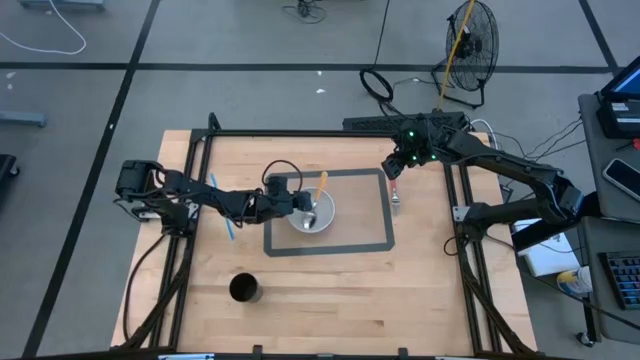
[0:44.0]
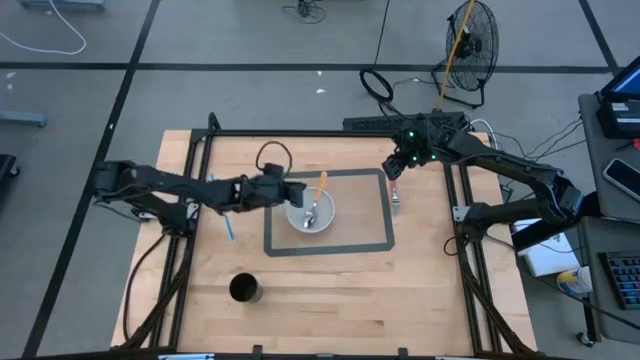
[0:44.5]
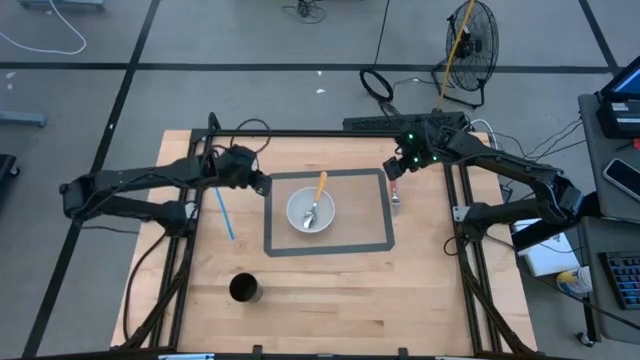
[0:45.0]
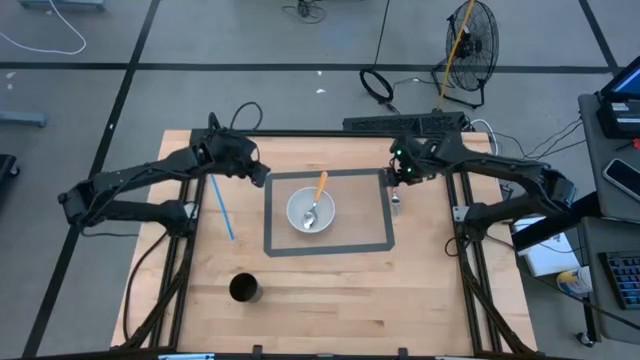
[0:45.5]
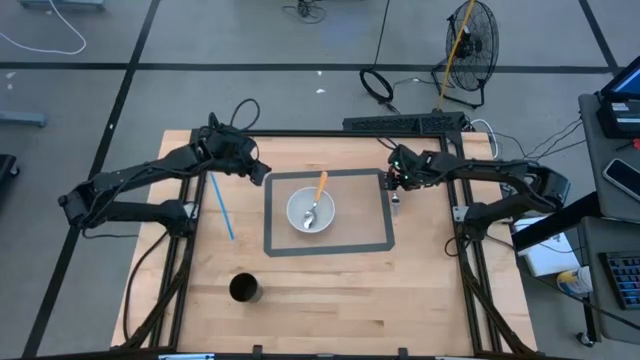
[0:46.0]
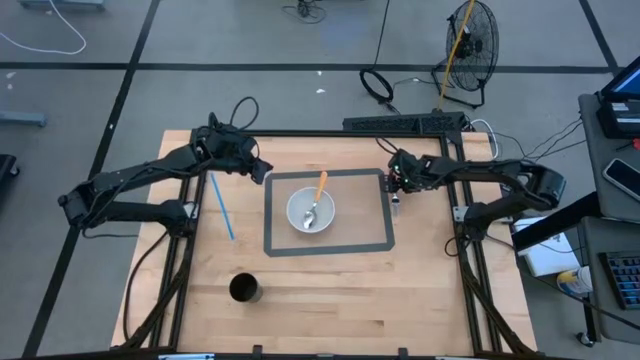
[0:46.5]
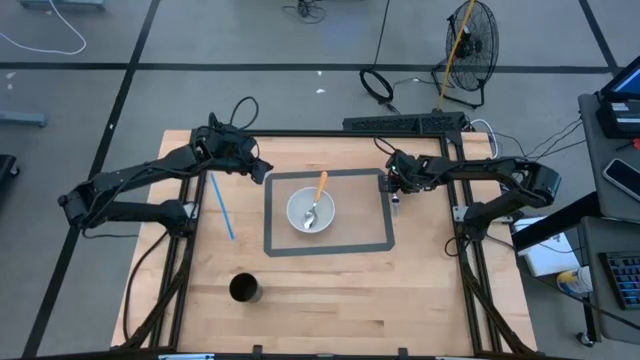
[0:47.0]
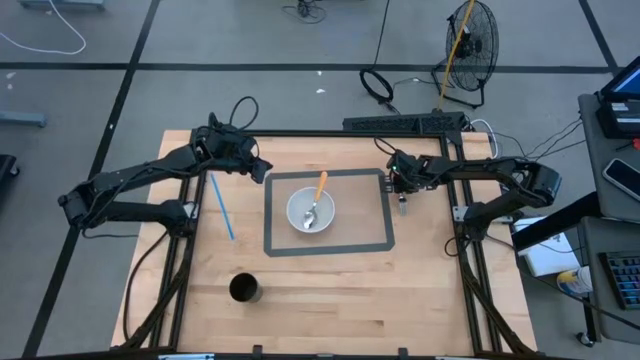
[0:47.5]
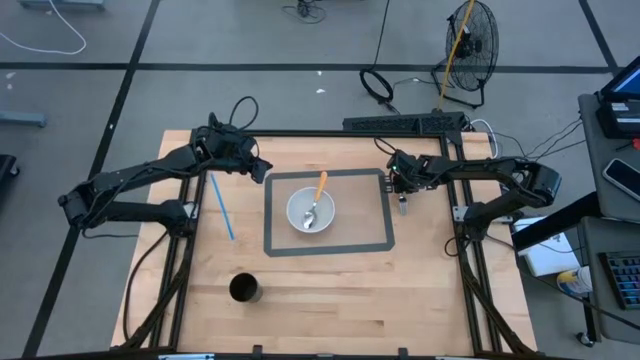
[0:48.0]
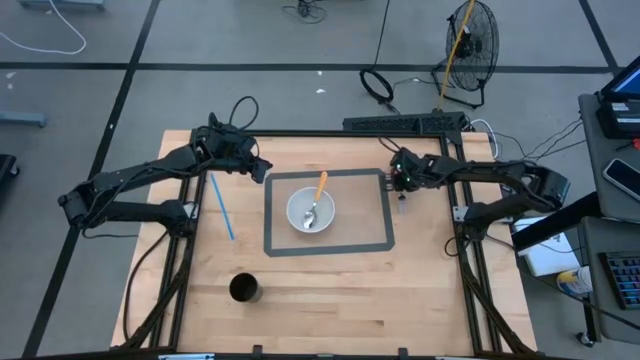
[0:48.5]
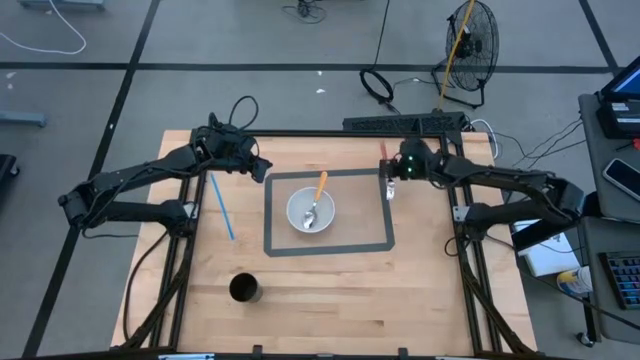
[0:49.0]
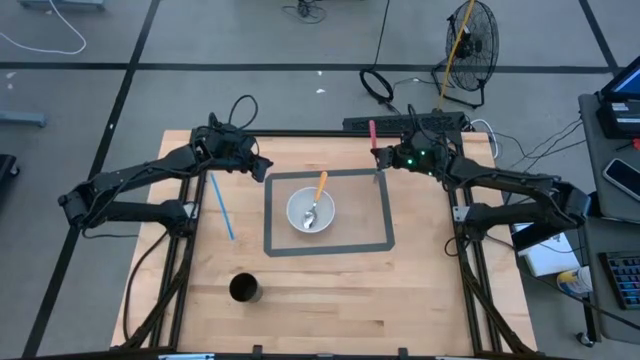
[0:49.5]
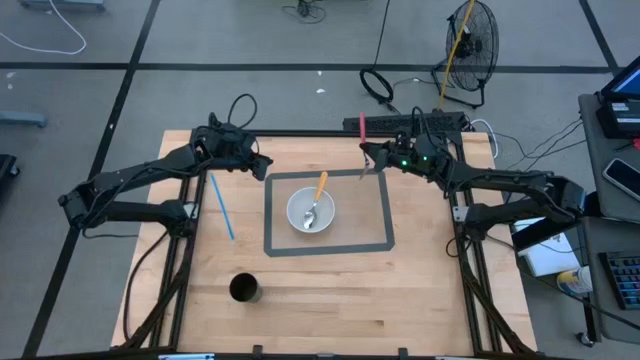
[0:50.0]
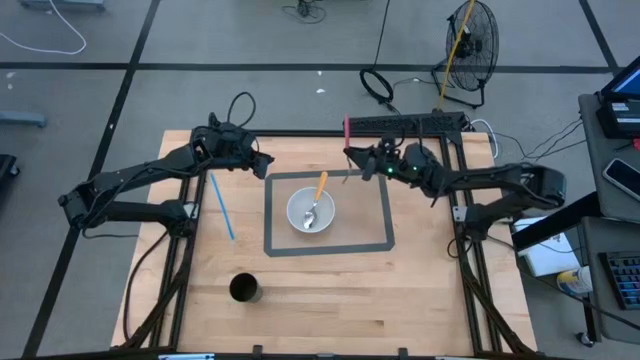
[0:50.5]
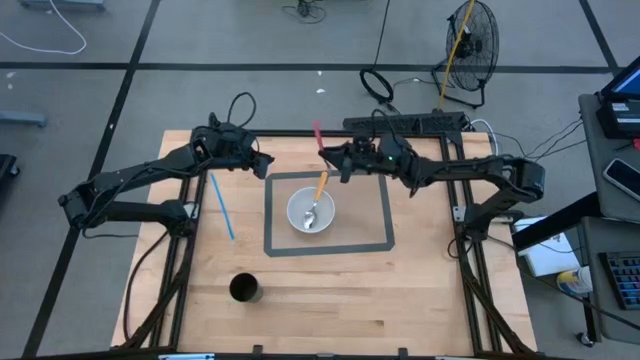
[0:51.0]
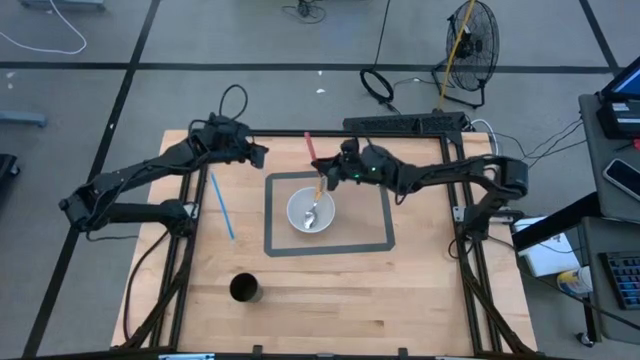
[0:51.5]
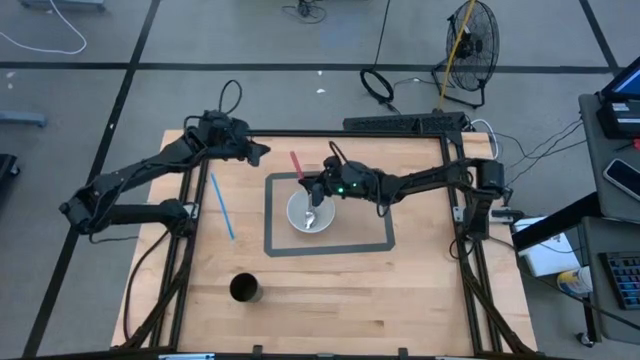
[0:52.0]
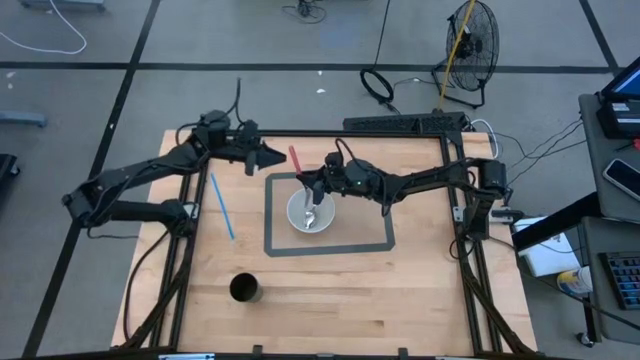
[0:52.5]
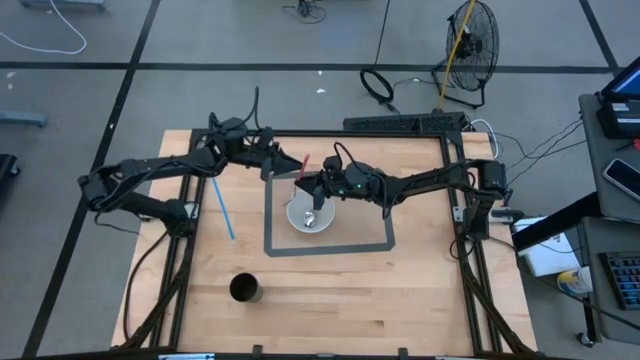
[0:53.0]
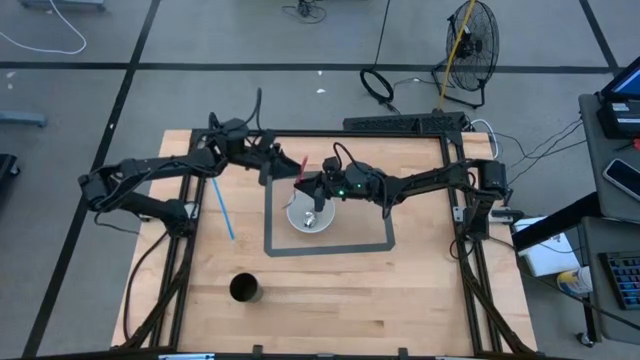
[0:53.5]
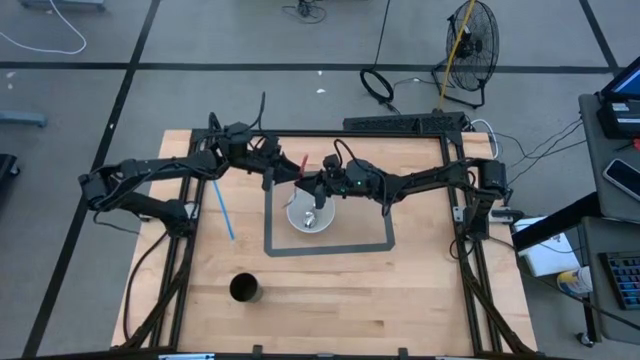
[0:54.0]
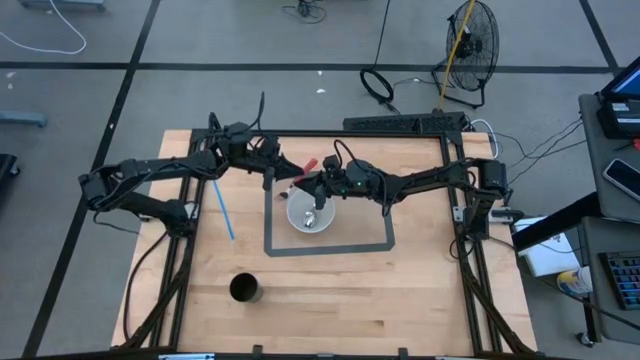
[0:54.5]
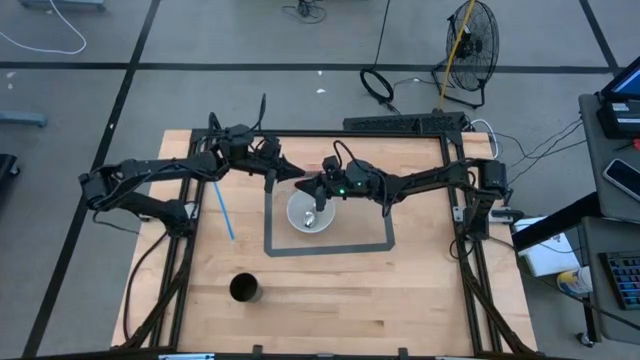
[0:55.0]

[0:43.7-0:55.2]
Task: Pick & Place Utensil
Put the pink fork into the bowl on the table mat

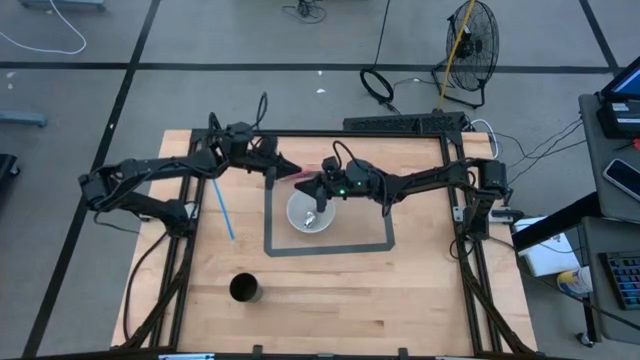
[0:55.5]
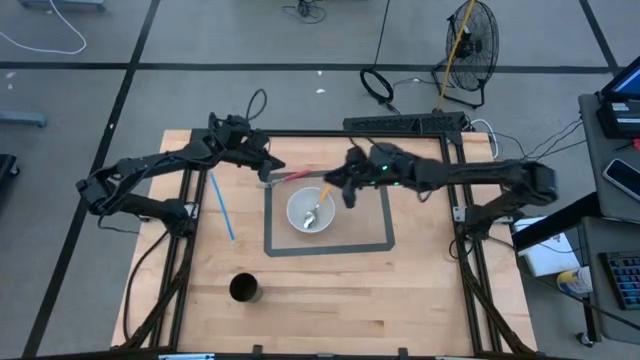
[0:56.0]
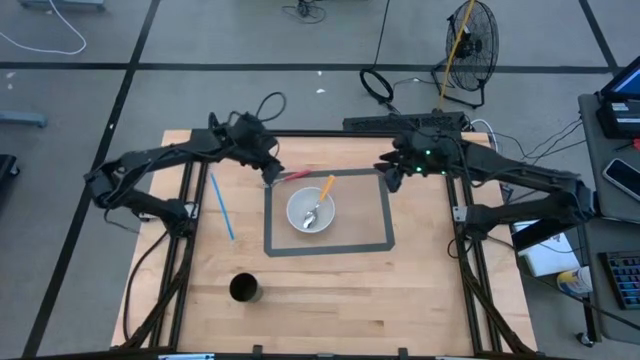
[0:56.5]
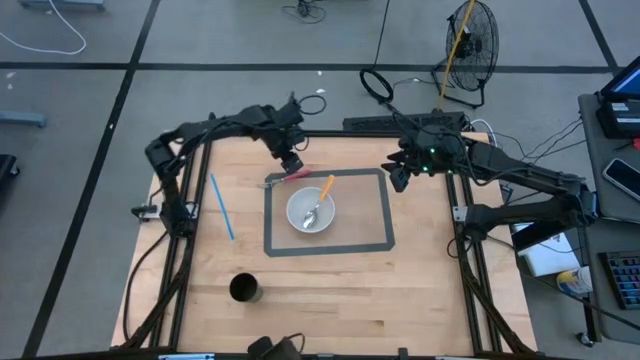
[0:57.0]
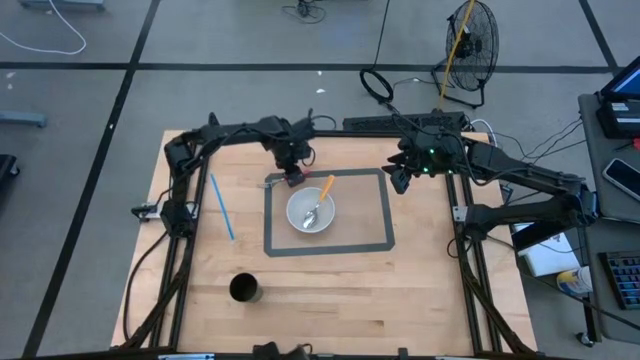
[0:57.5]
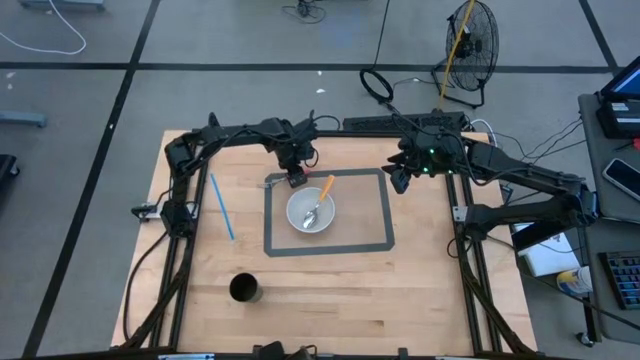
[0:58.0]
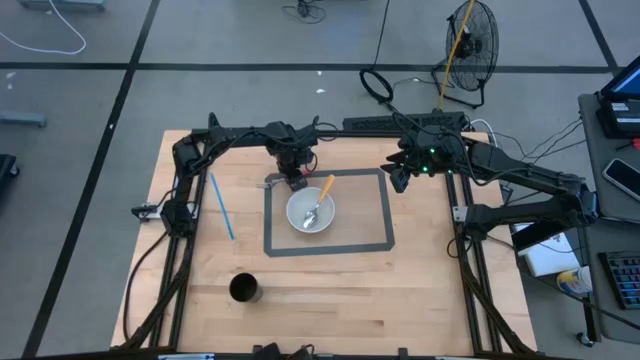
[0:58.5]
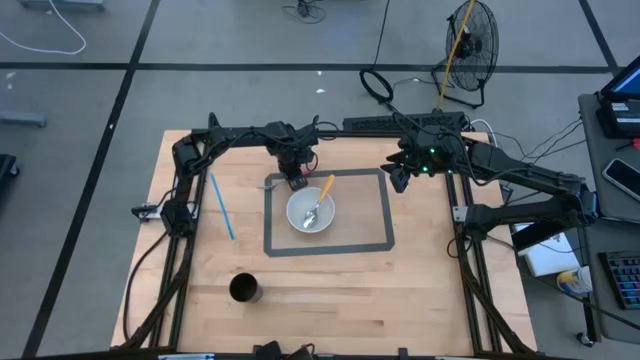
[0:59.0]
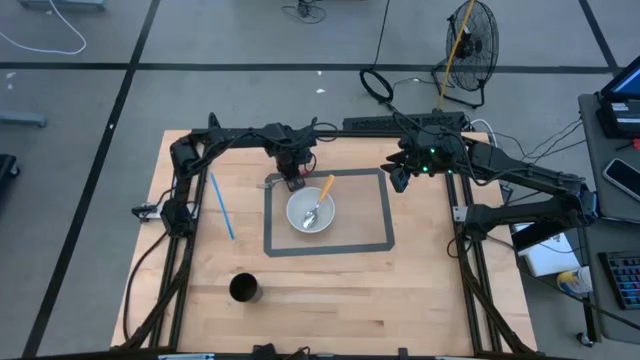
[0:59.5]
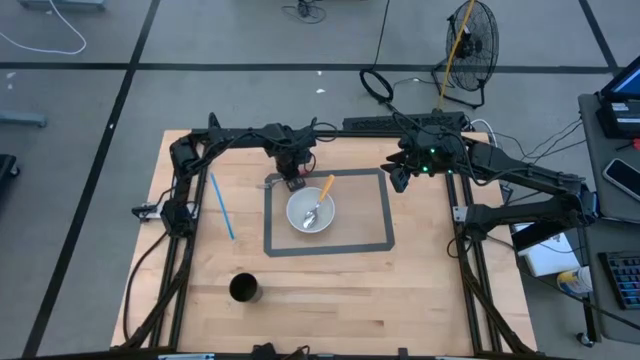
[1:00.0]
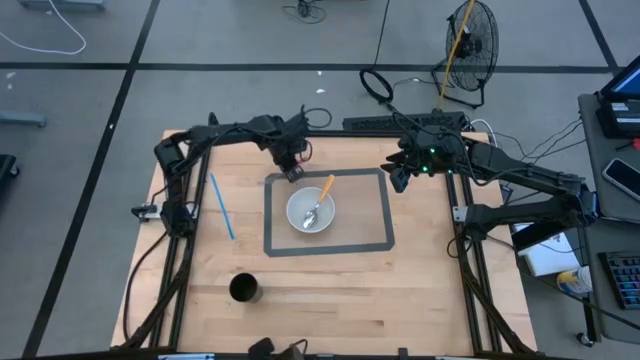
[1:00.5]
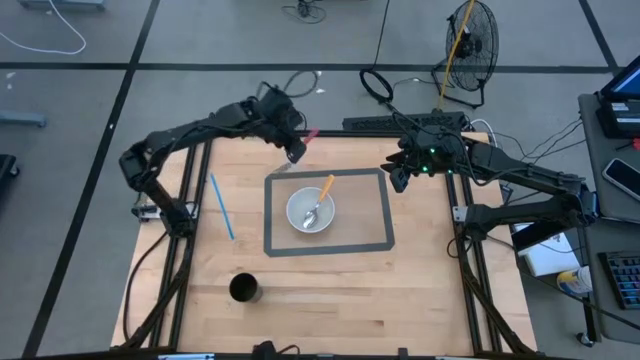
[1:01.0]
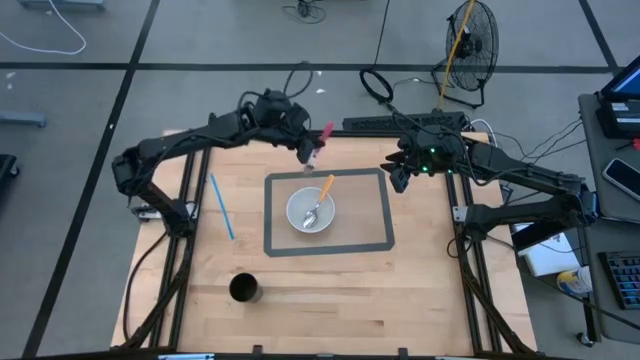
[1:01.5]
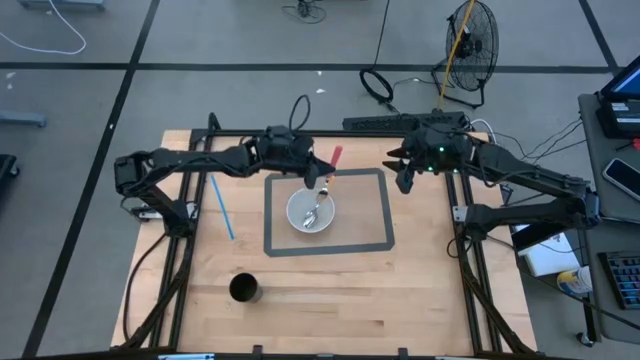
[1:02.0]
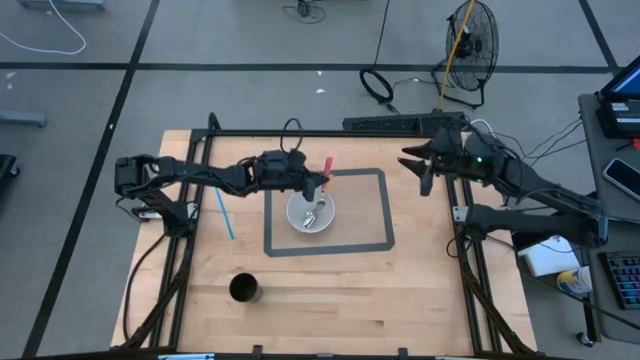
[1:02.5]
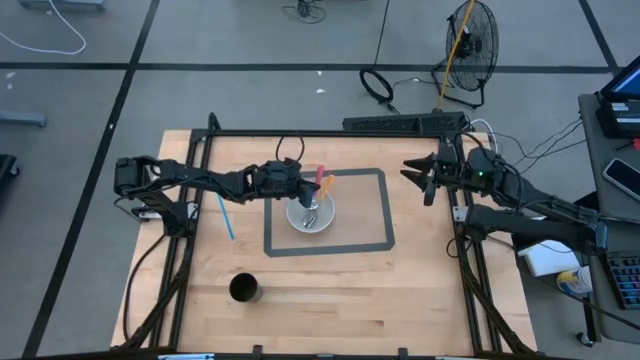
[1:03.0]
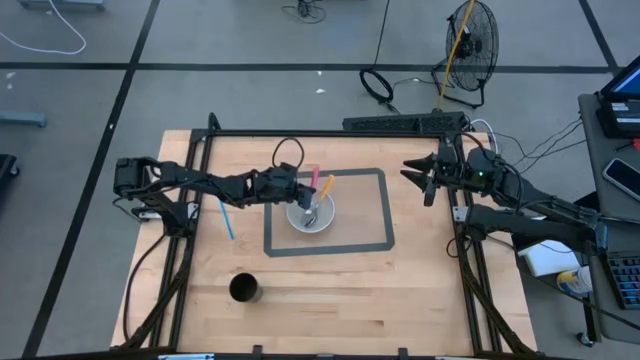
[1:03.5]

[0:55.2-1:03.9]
Put the pink fork into the bowl on the table mat
